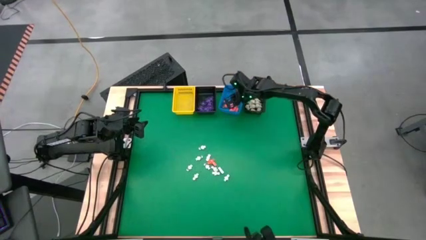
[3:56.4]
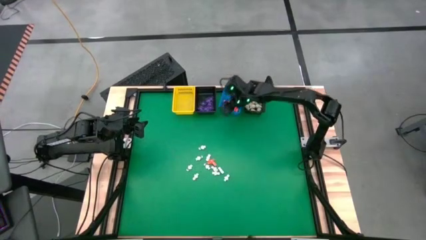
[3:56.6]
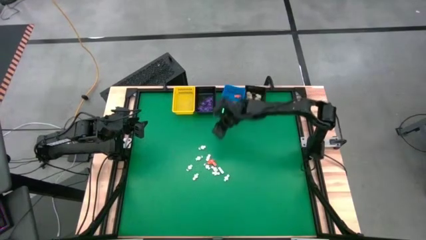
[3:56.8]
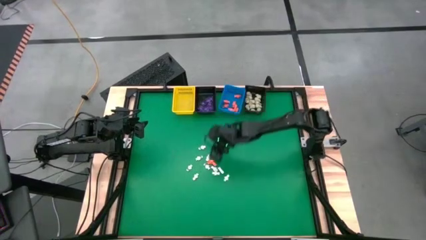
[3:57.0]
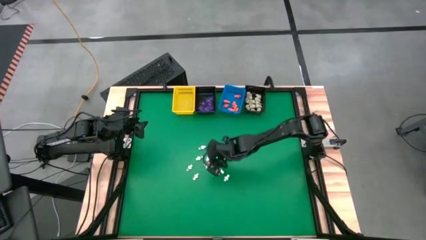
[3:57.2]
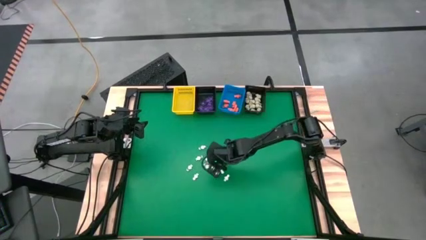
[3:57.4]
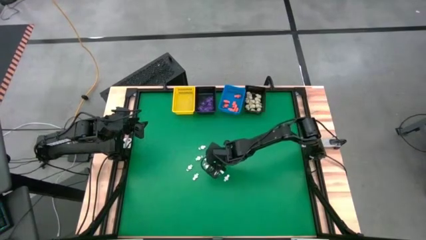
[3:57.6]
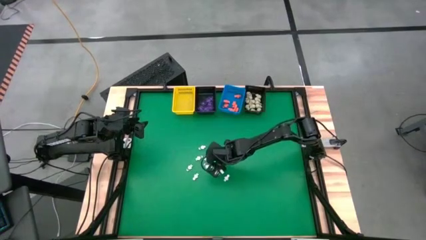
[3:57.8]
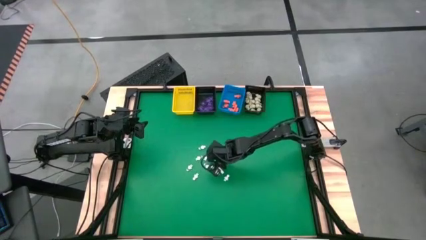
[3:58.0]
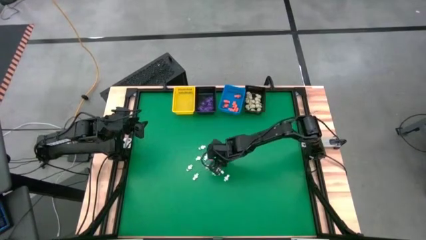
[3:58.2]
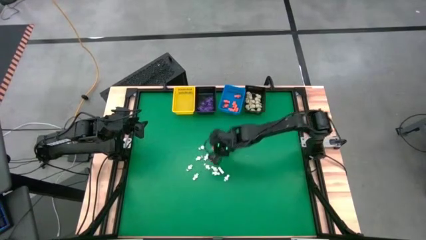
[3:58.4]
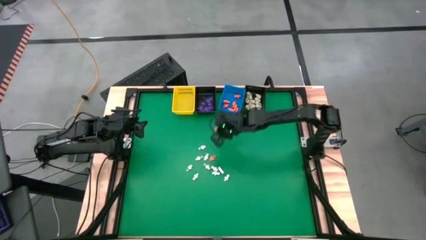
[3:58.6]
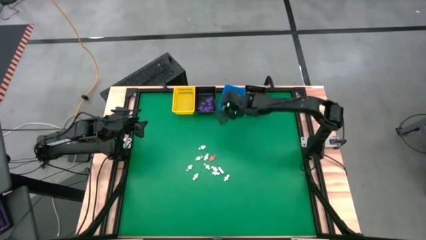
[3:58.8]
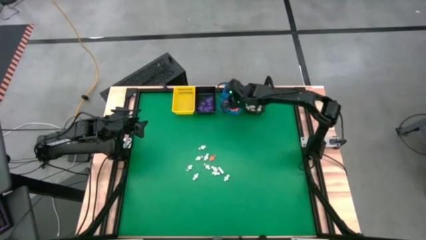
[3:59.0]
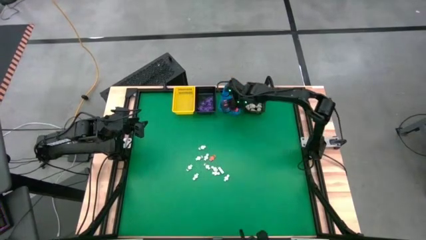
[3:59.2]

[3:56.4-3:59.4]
Task: Sort Halloween decoration
Put the orange skeleton toy into the blue basket

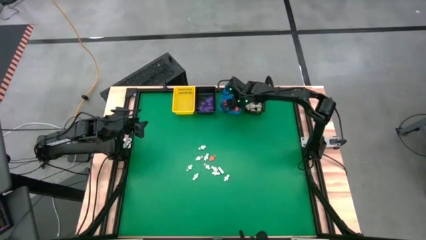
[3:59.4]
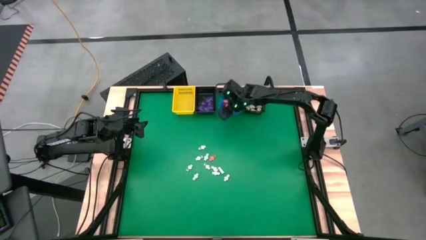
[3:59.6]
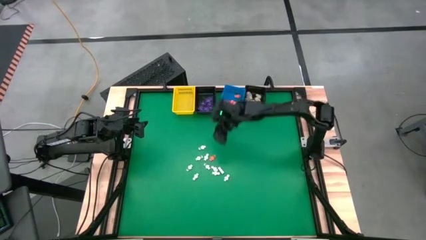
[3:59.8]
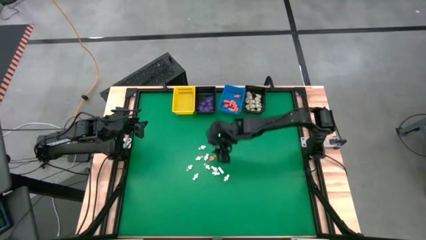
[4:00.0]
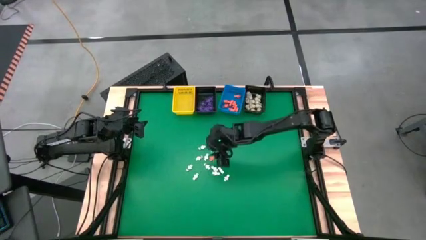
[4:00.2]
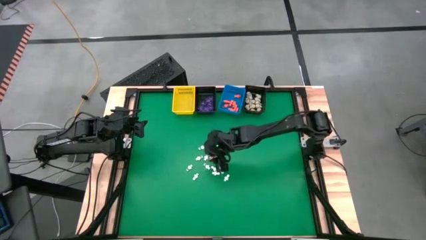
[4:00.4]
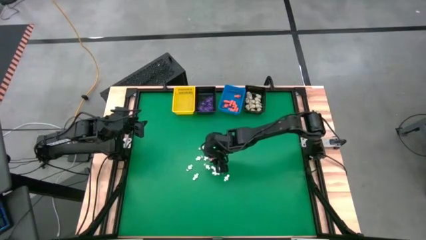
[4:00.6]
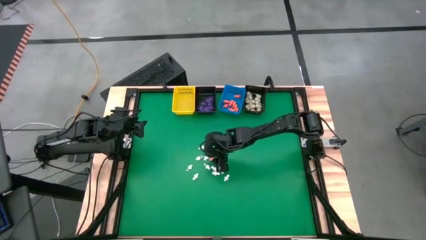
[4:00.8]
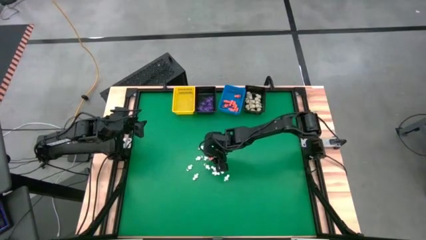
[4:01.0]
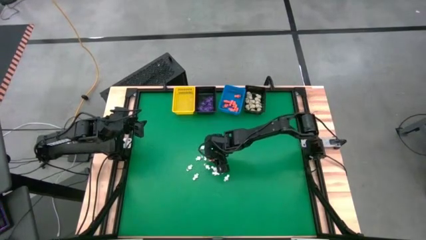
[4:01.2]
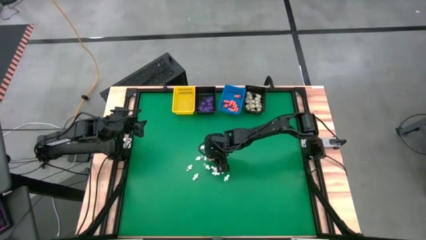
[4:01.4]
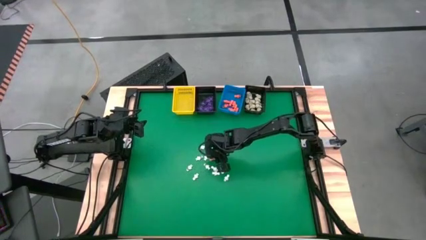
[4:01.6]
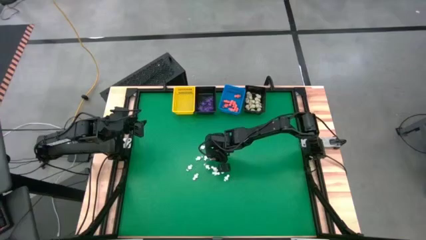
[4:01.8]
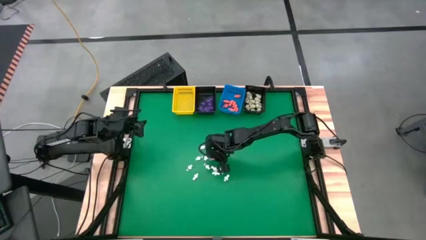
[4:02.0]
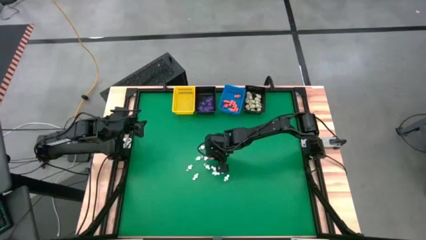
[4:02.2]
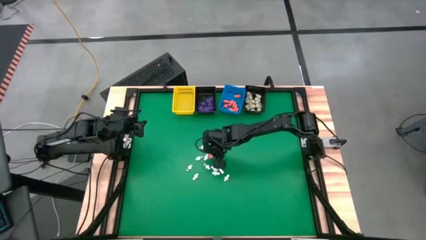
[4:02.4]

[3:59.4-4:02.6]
Put the orange skeleton toy into the blue basket

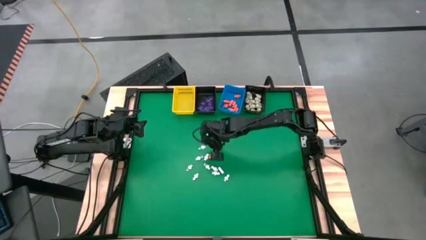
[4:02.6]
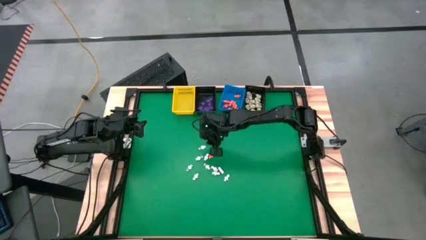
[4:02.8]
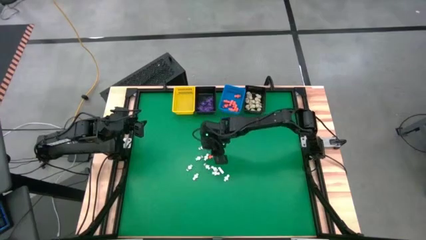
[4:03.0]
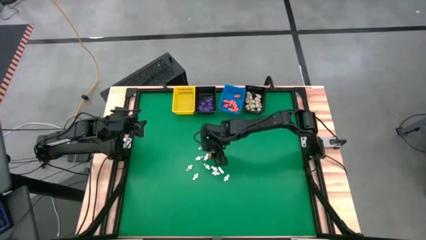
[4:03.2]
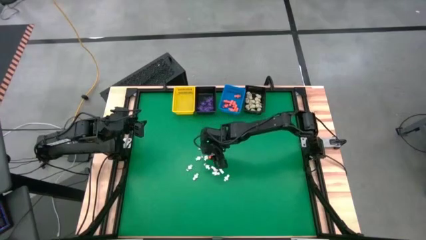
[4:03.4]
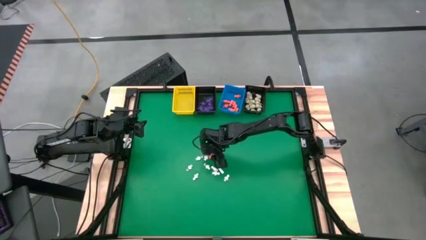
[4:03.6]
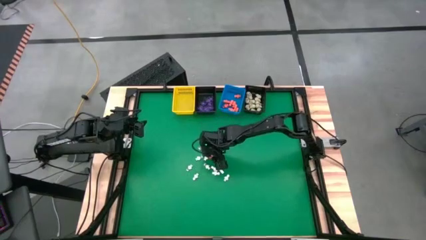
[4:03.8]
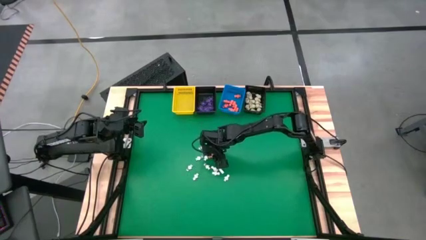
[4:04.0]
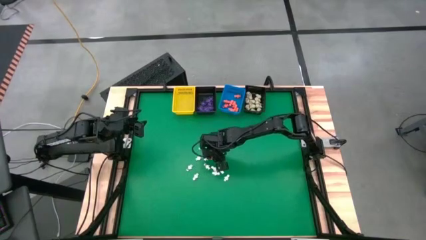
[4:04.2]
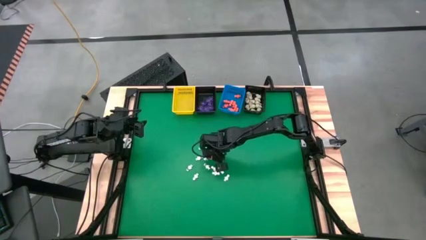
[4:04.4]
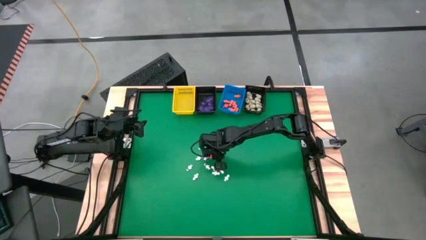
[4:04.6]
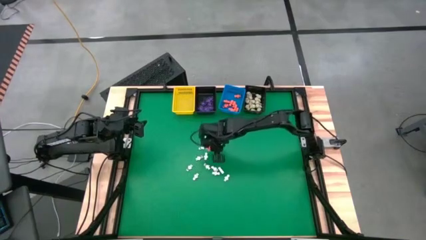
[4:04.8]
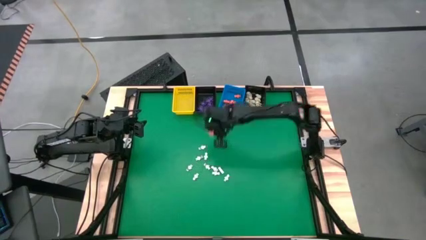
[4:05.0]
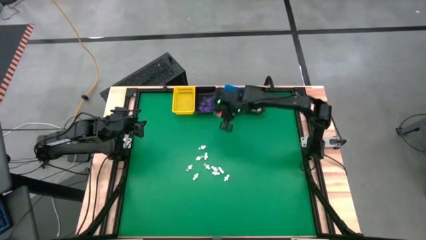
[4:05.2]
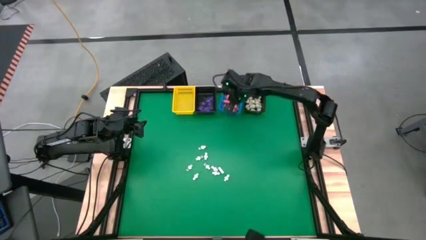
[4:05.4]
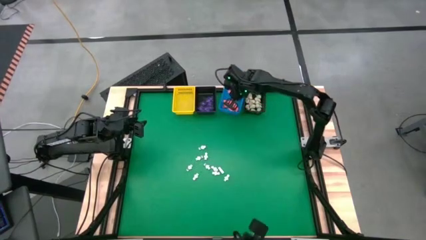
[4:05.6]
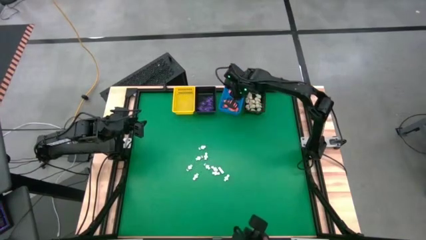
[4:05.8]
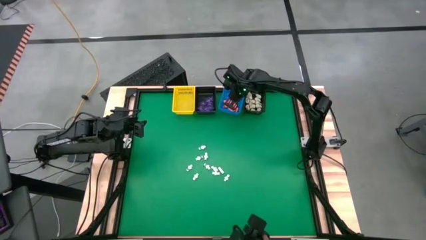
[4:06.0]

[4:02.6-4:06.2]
Put the orange skeleton toy into the blue basket

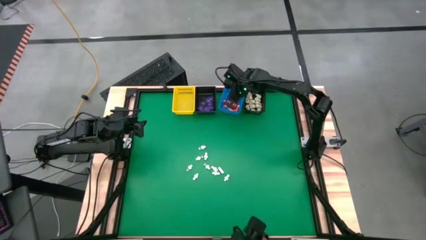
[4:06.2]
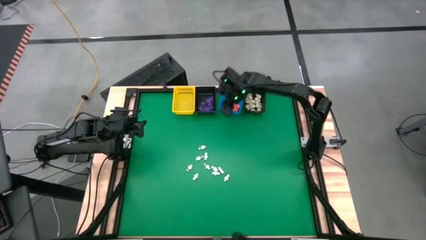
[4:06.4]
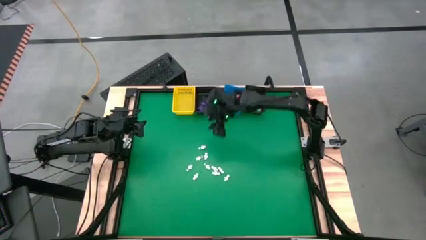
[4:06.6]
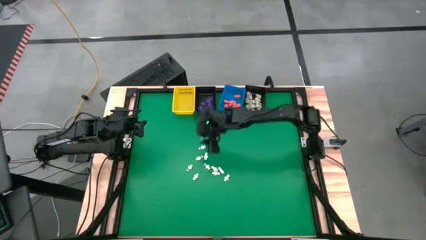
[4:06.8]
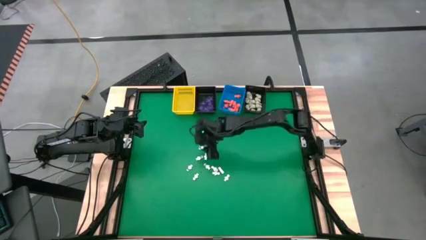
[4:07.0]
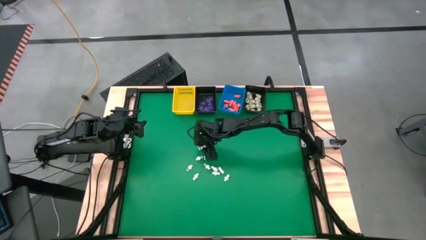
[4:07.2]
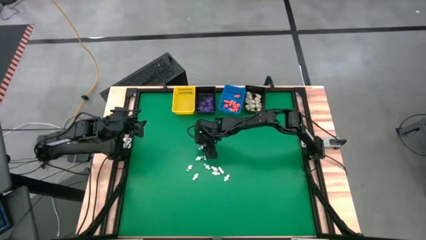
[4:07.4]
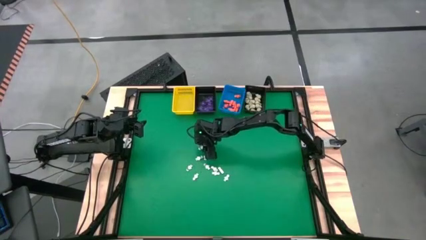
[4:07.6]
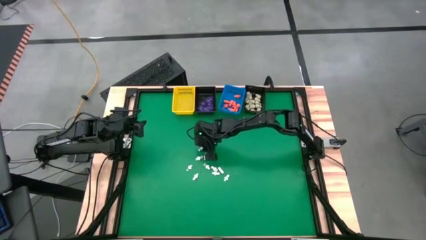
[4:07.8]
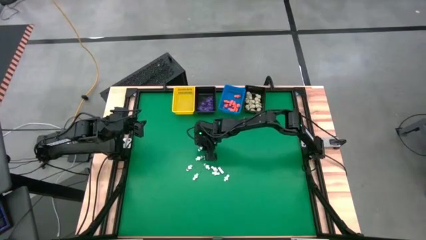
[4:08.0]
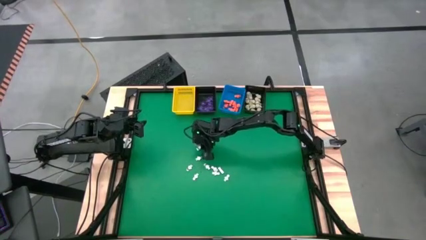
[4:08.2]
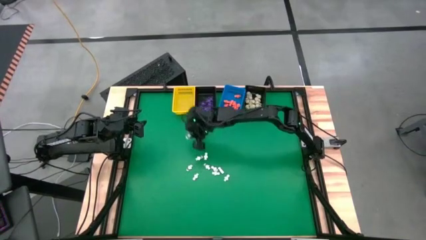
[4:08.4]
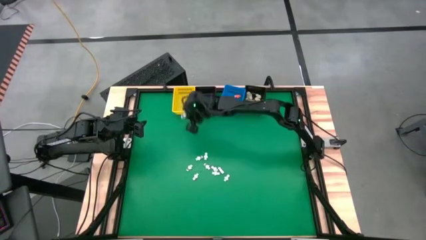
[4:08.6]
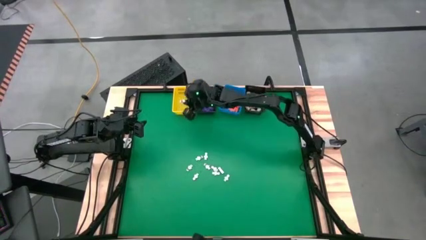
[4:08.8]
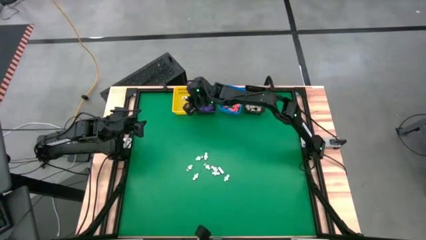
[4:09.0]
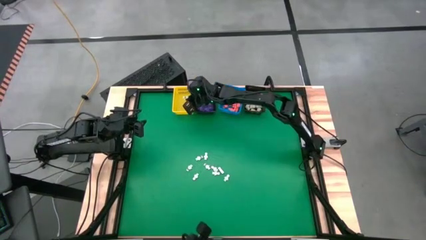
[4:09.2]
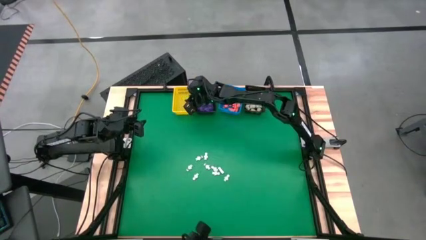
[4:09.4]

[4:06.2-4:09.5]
Put the white skeleton toy into the yellow basket

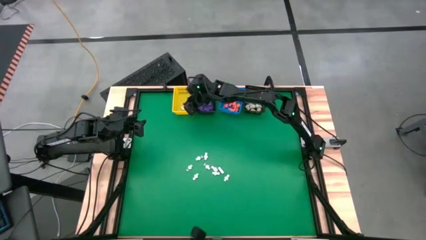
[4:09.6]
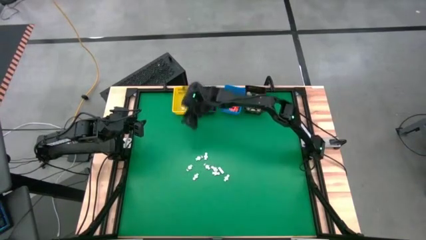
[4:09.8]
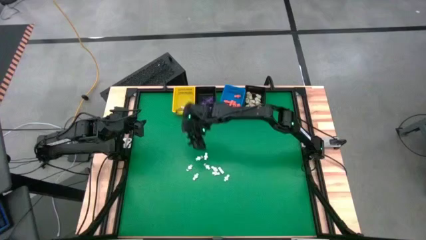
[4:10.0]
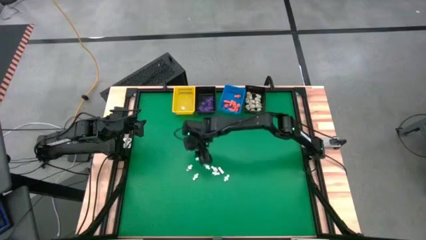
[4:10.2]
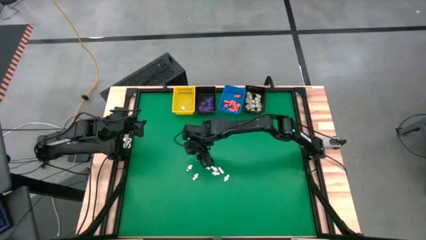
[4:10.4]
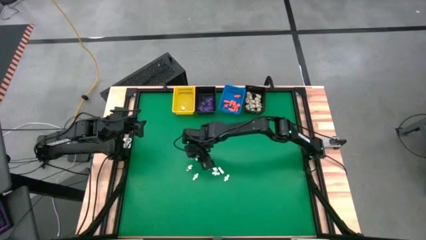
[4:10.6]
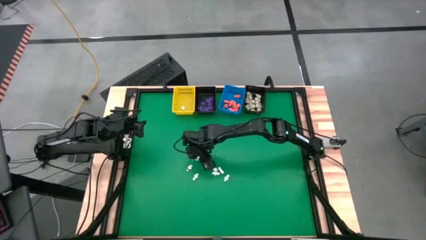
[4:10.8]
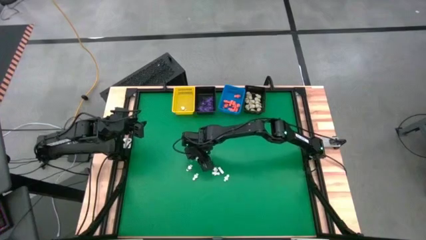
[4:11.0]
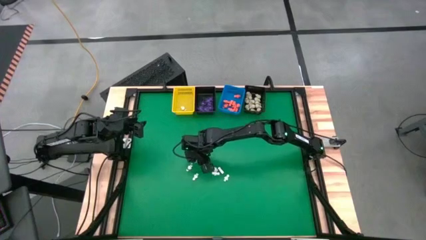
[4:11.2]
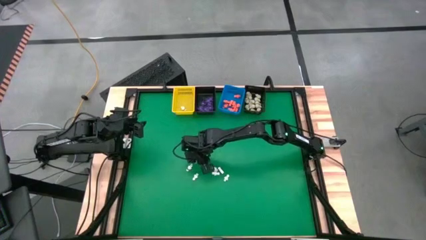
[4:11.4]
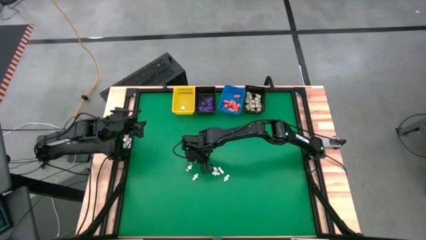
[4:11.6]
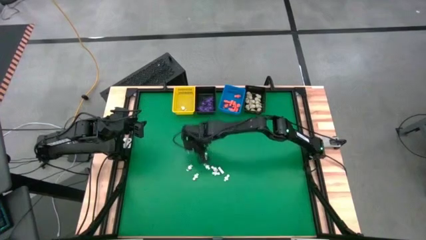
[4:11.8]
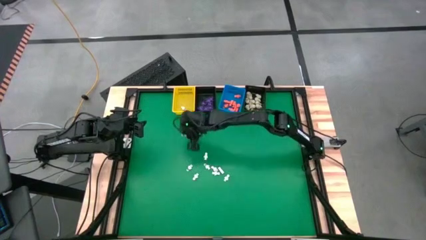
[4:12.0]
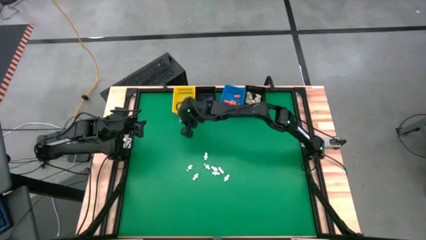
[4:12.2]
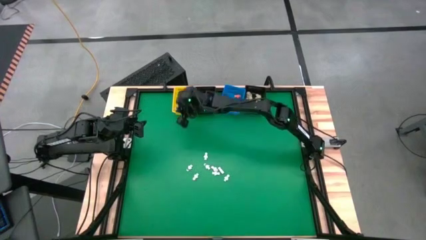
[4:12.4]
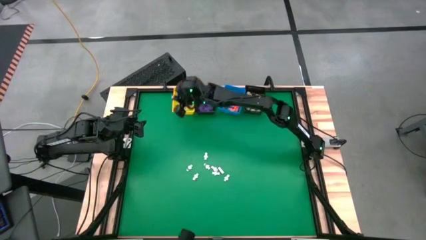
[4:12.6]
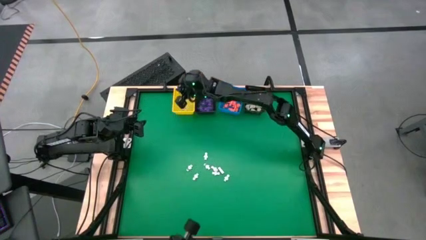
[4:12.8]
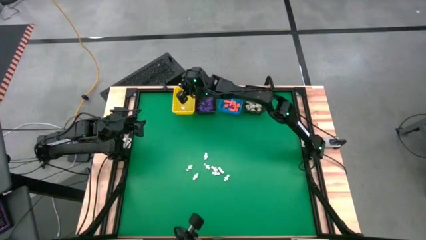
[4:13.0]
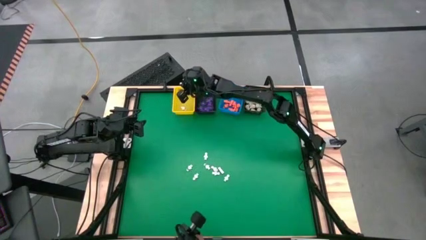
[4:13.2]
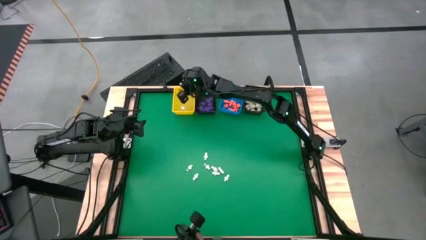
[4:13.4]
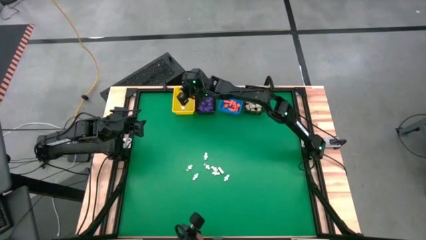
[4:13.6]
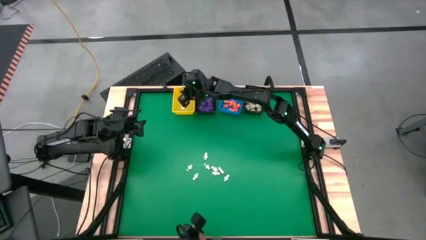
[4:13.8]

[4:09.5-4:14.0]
Put the white skeleton toy into the yellow basket
